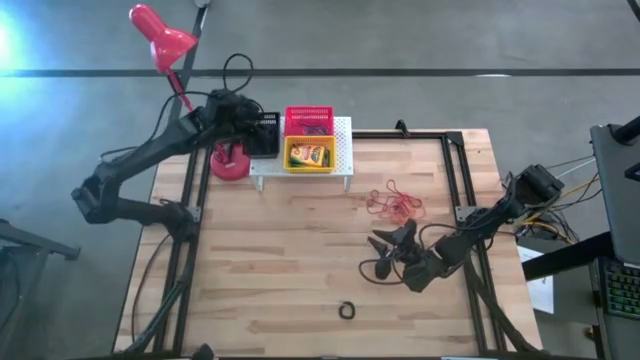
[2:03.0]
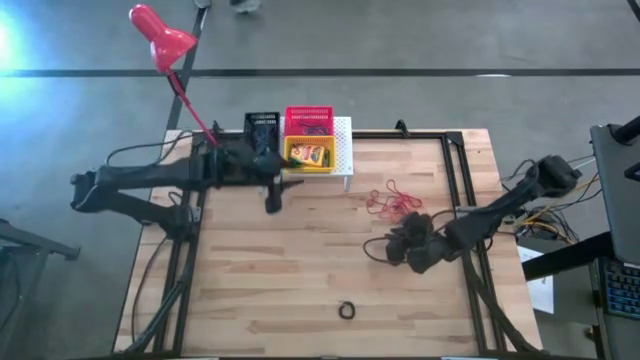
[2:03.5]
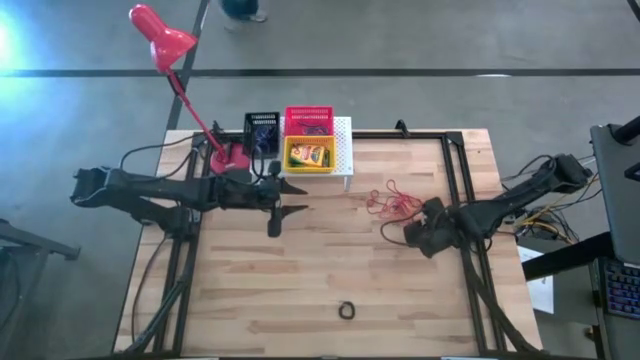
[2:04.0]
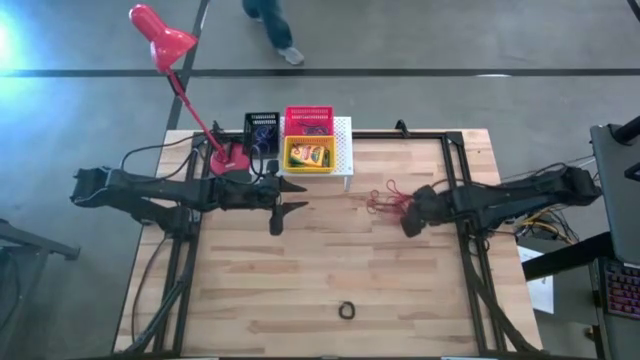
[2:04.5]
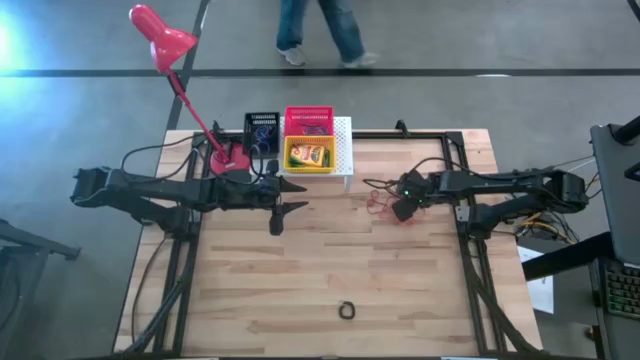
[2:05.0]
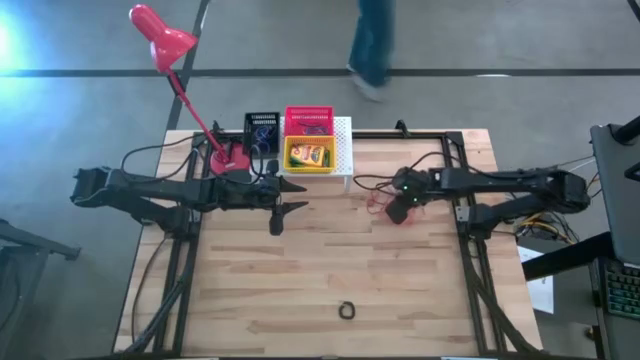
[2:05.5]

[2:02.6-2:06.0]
Task: Pick & Place Office Desk Supplies
Put the orange rubber band into the red bin on the shelf

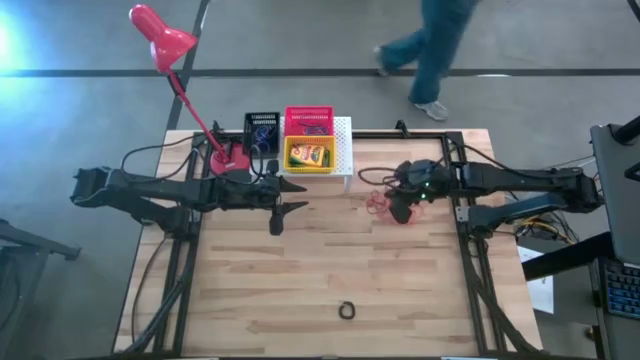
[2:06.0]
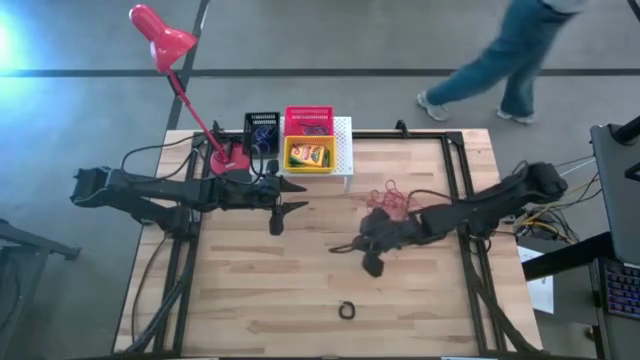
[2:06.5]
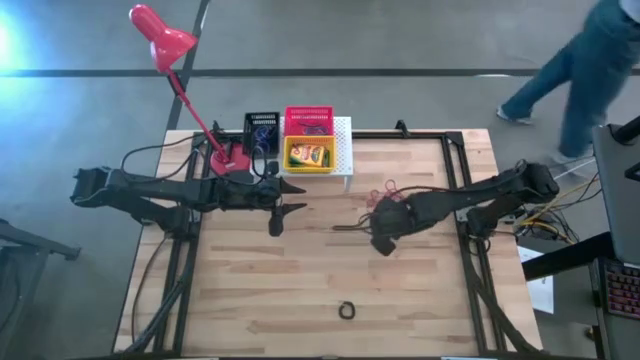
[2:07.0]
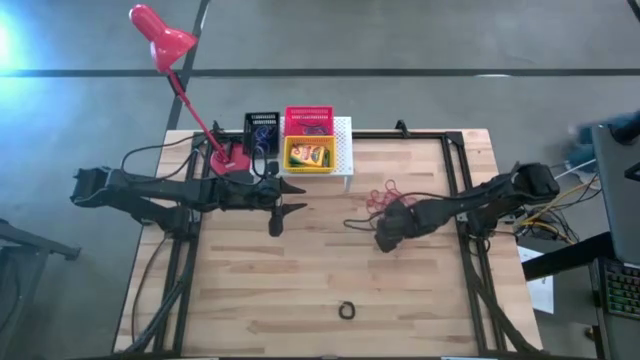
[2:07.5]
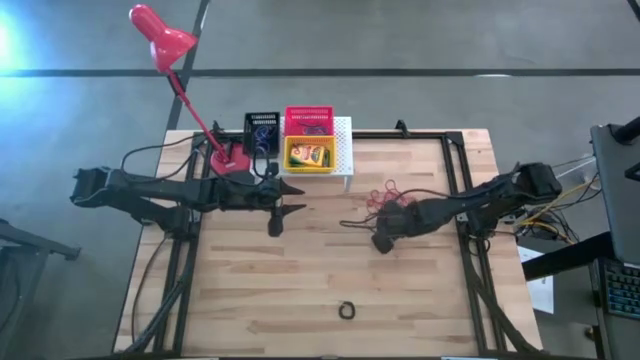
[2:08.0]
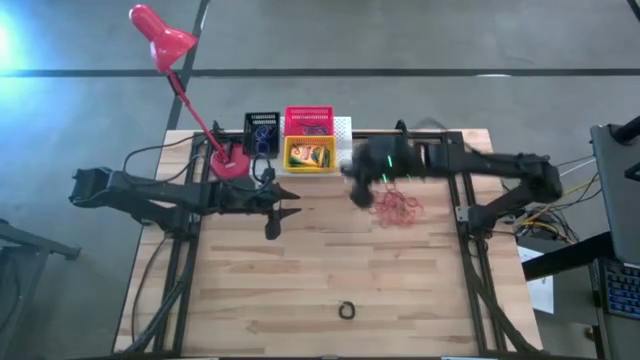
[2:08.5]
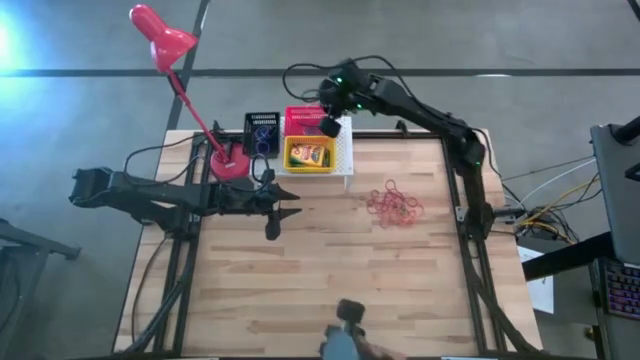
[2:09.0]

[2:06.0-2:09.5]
Put the orange rubber band into the red bin on the shelf

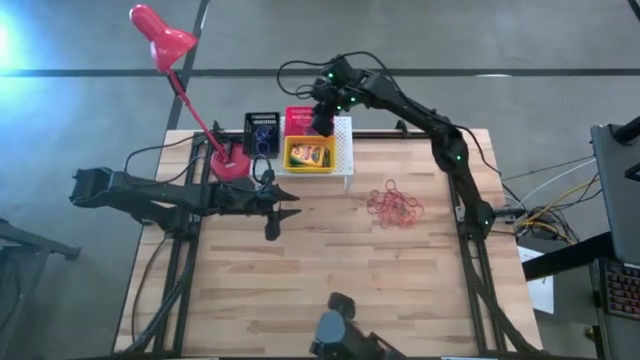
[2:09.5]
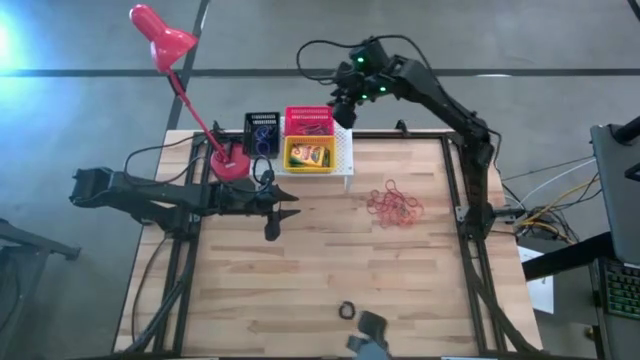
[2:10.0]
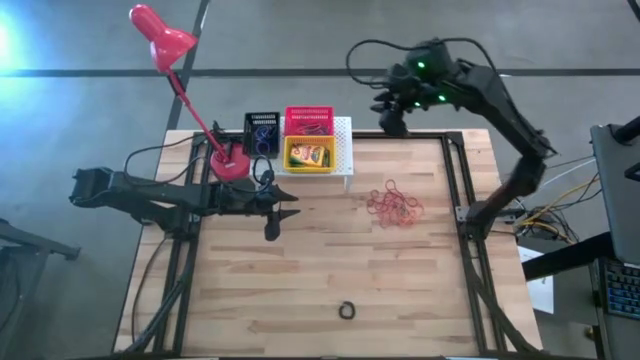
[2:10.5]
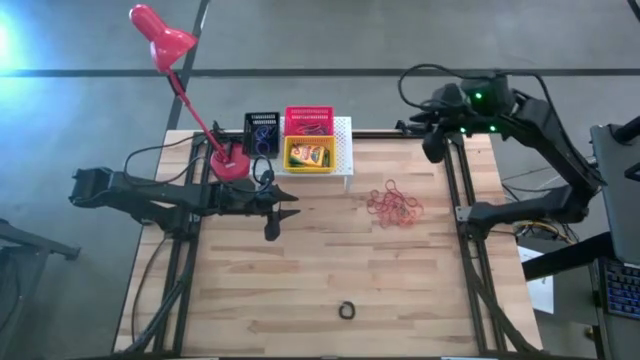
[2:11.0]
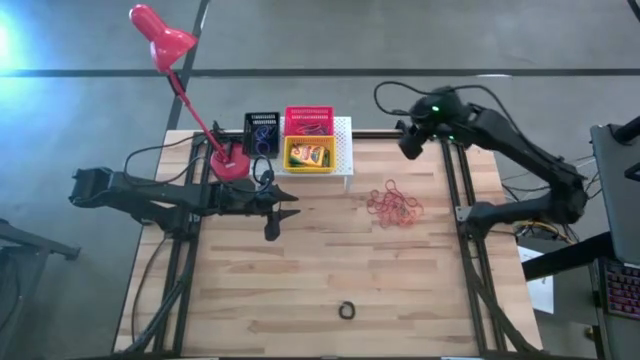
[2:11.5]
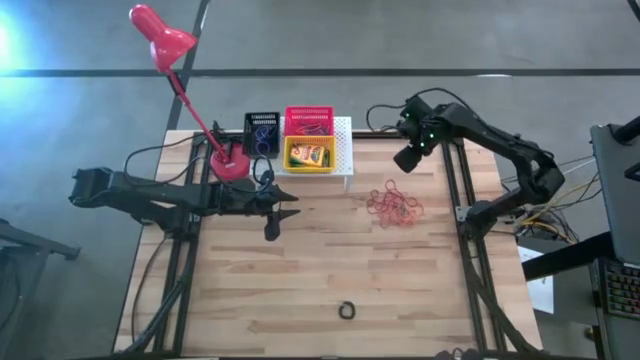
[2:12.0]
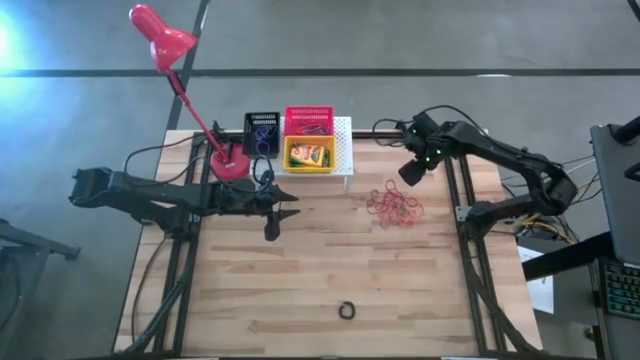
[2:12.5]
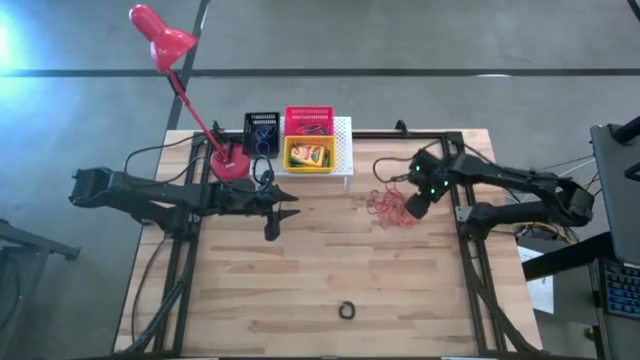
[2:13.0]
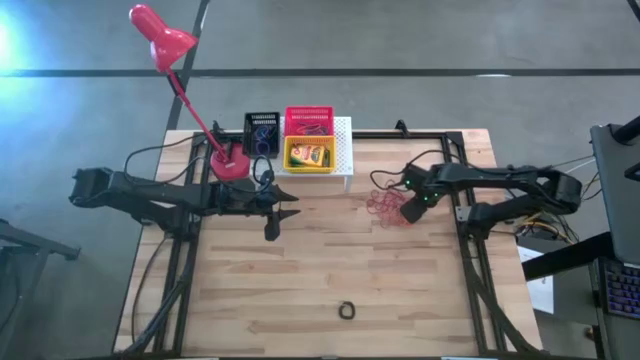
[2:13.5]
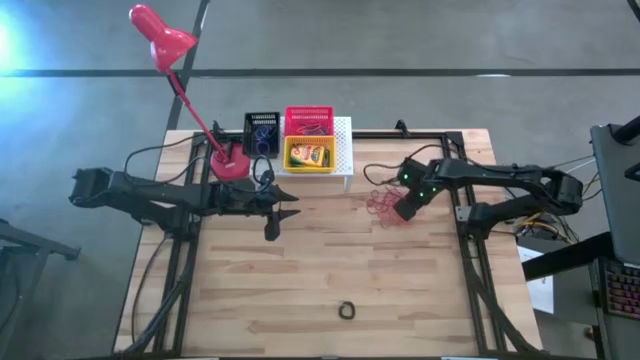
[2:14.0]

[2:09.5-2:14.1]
Put the orange rubber band into the red bin on the shelf

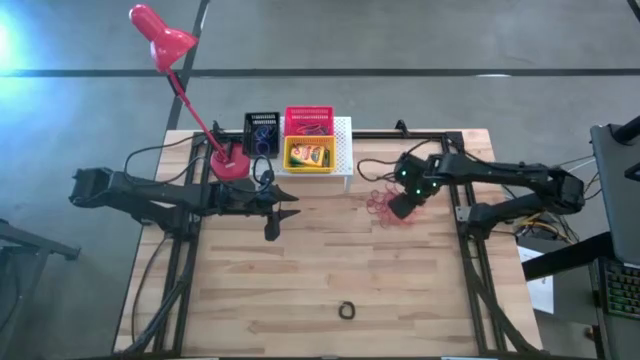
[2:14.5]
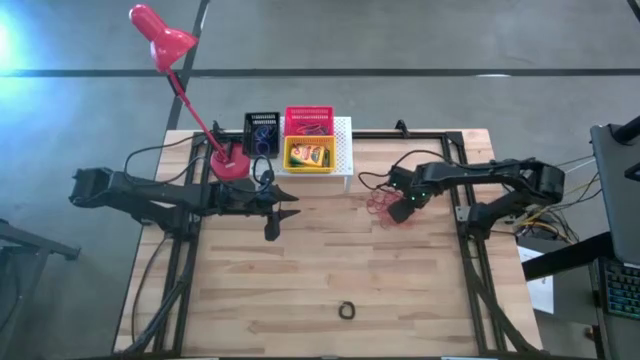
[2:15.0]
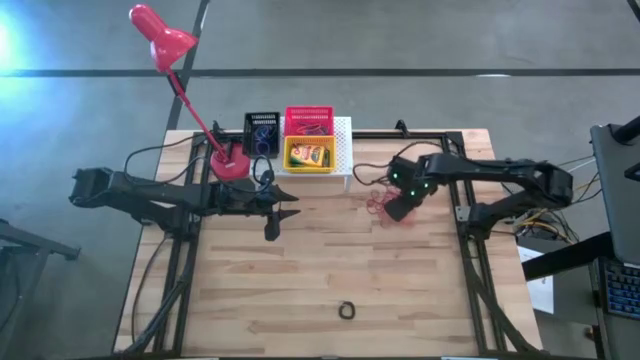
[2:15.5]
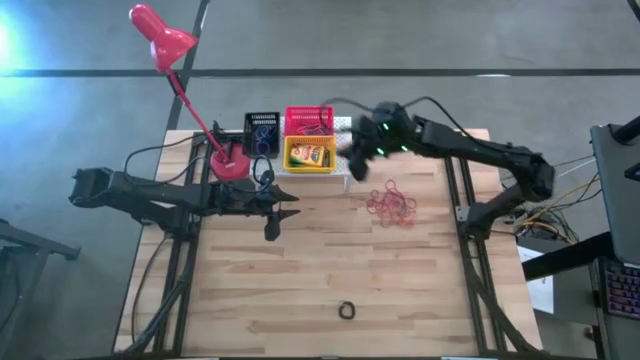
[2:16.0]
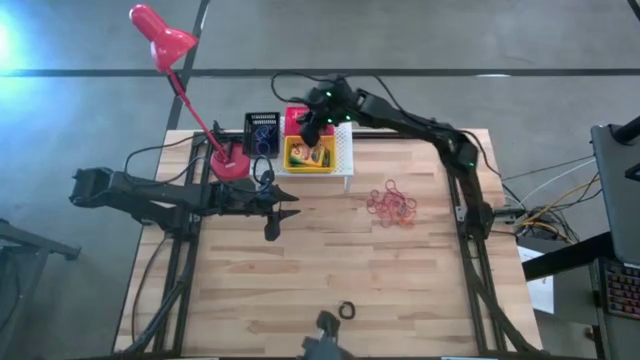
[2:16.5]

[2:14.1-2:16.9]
Put the orange rubber band into the red bin on the shelf

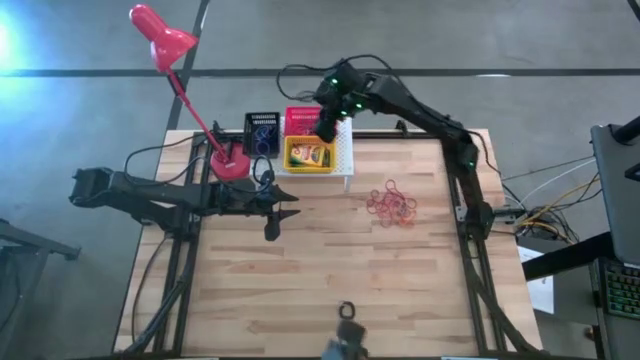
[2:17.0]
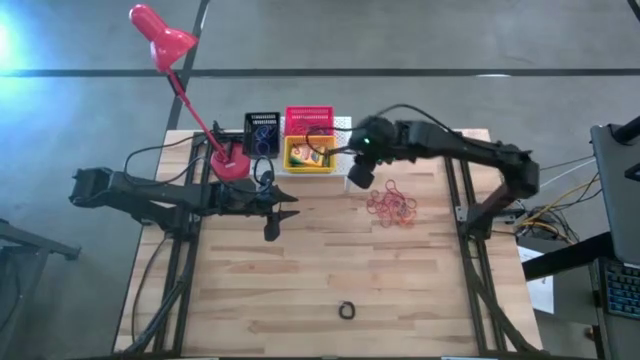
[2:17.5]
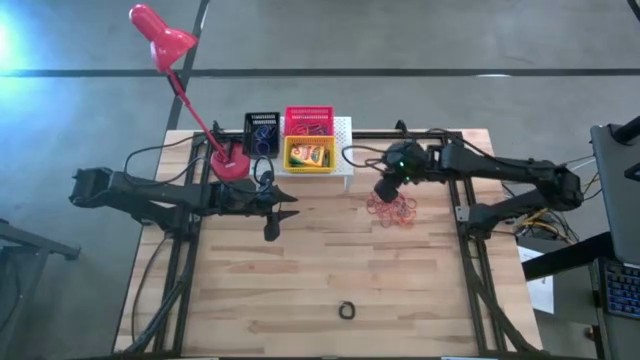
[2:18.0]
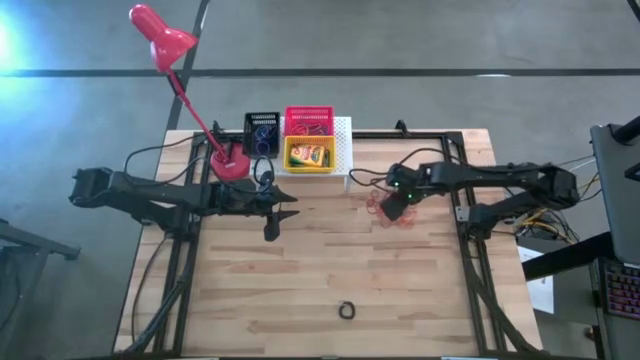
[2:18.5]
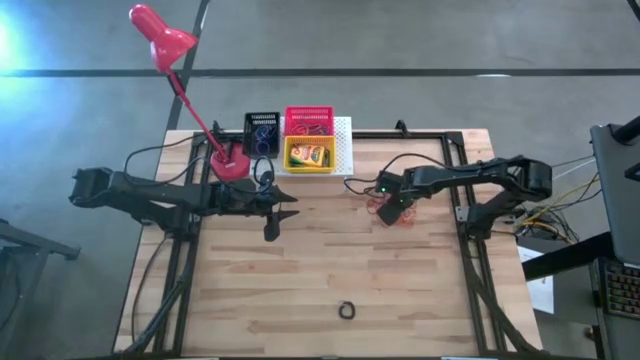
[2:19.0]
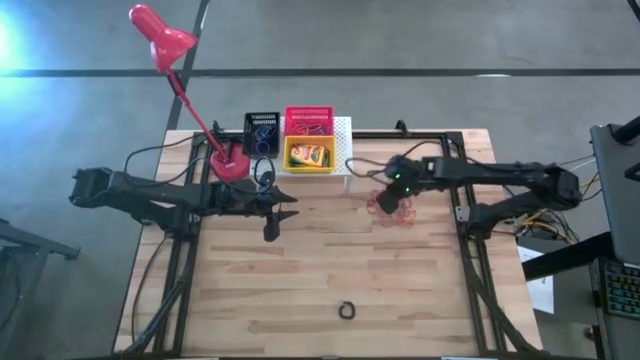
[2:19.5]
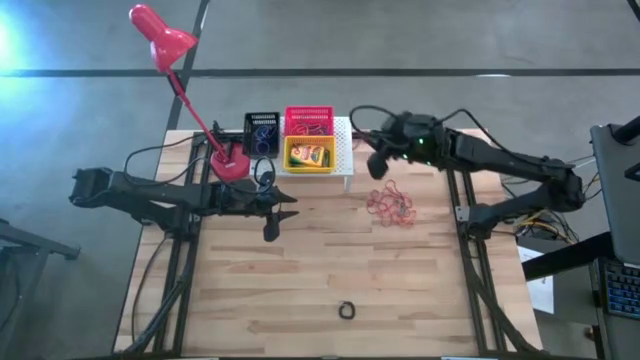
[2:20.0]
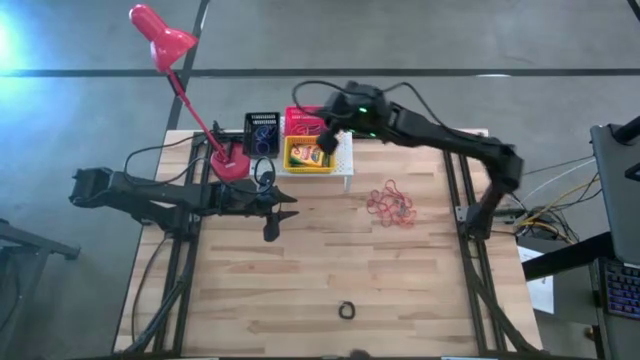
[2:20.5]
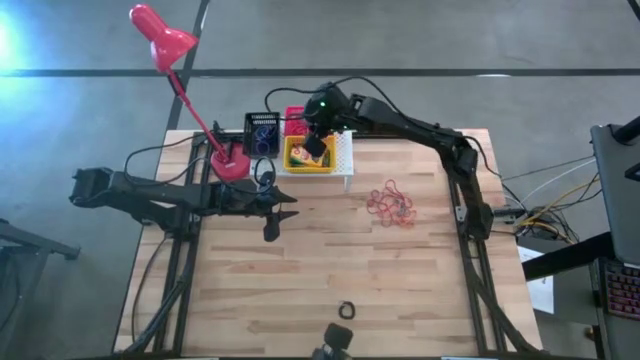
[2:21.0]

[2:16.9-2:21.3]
Put the red rubber band into the red bin on the shelf

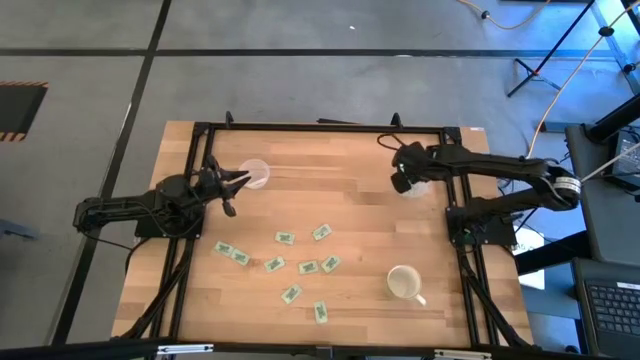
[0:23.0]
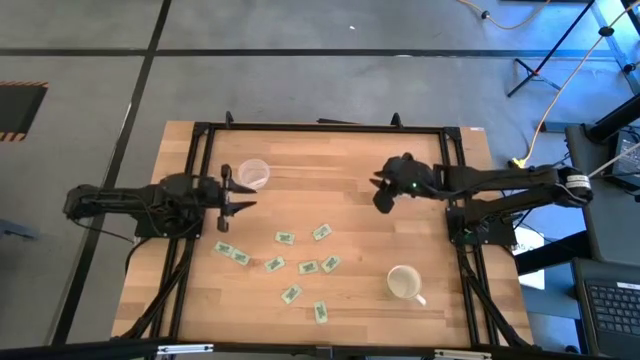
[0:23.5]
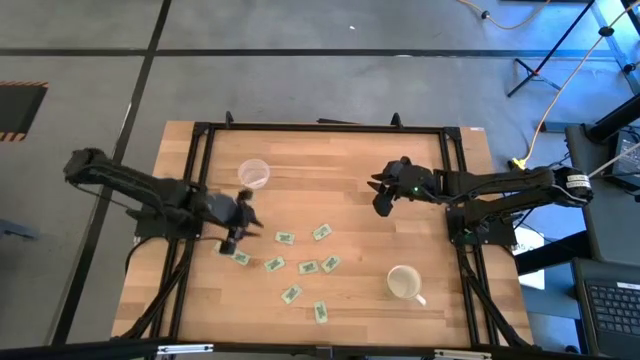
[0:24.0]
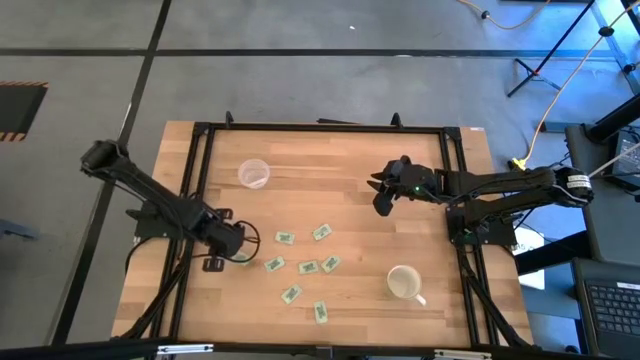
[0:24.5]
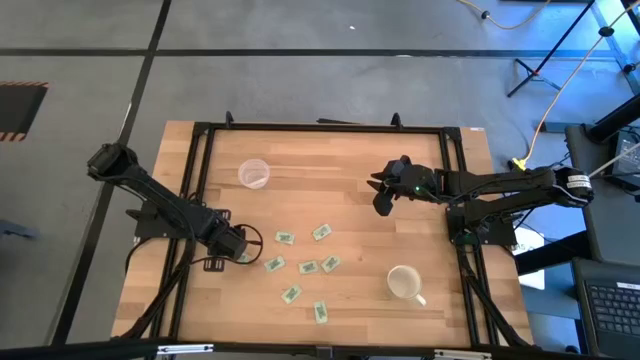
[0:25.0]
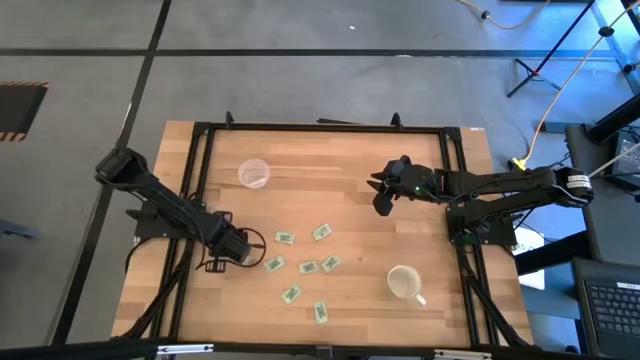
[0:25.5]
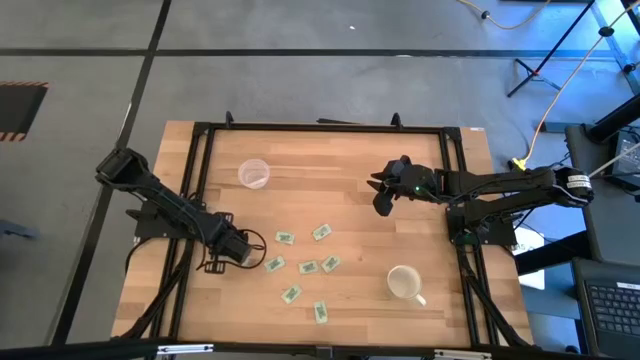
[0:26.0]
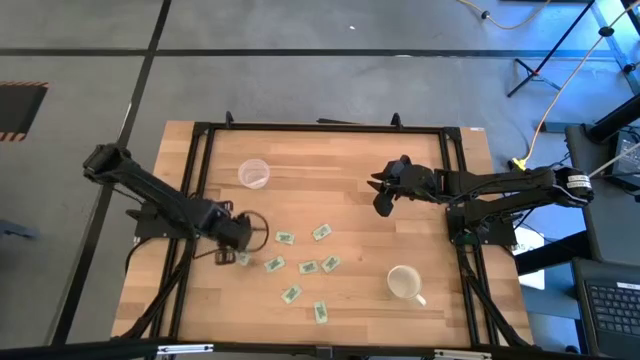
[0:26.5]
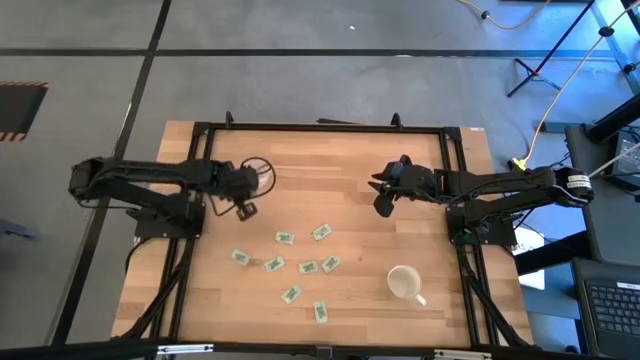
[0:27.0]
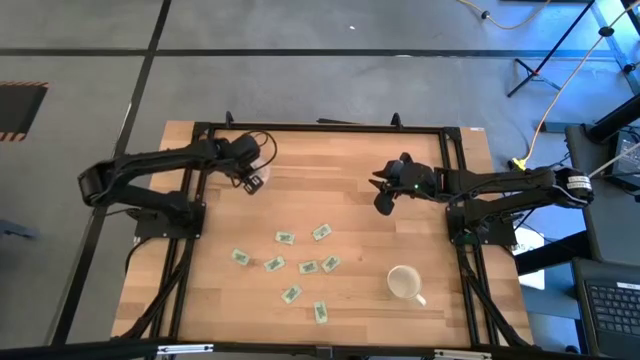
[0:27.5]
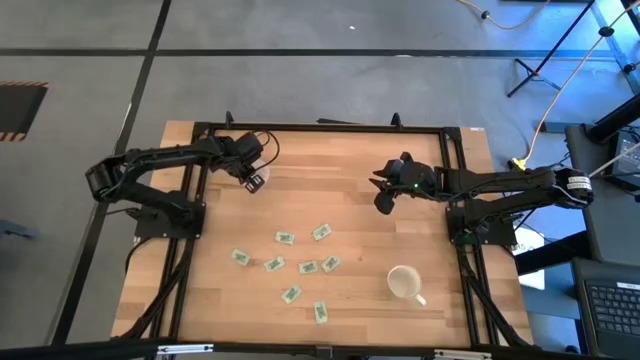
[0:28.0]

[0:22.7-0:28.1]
Task: Pick and place Stevia / Truvia into bins
Put the stevia packet into the left transparent container
